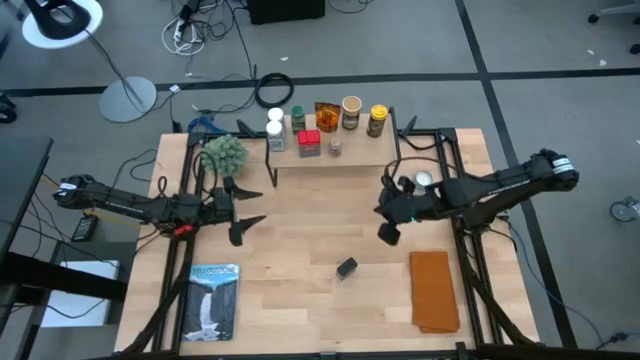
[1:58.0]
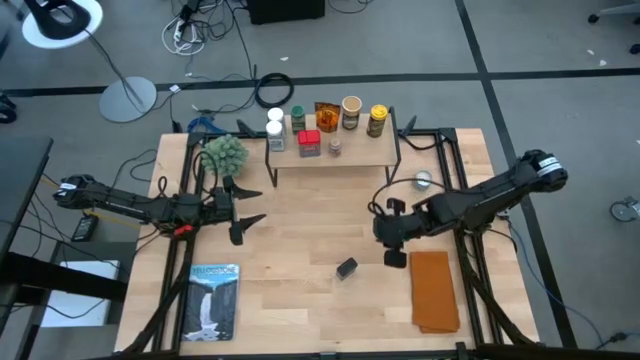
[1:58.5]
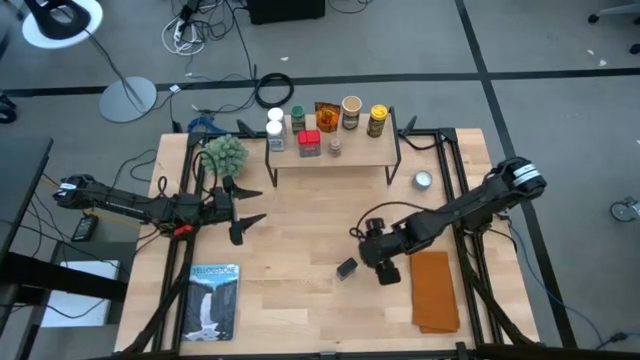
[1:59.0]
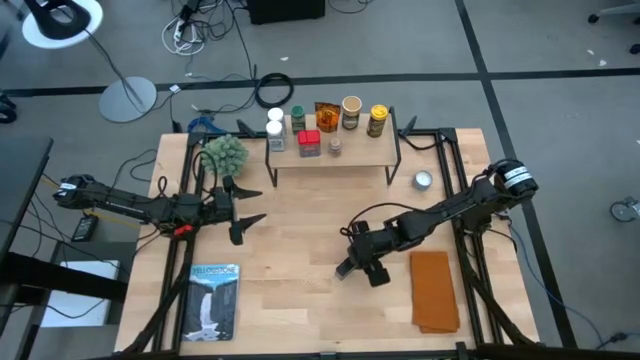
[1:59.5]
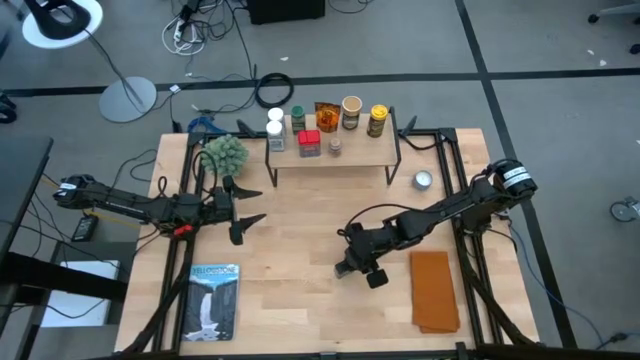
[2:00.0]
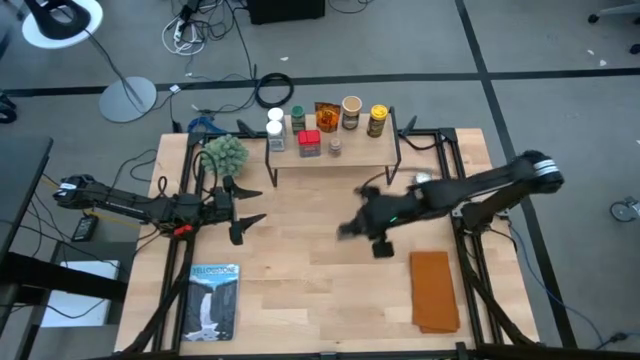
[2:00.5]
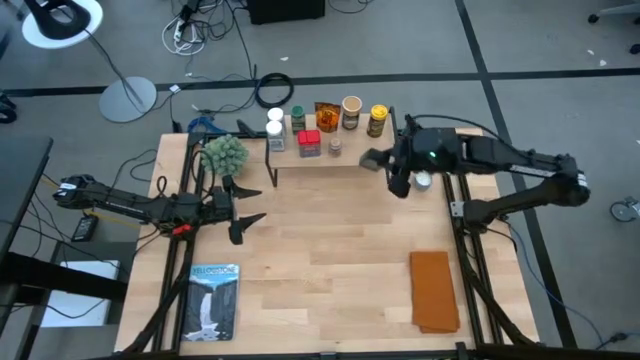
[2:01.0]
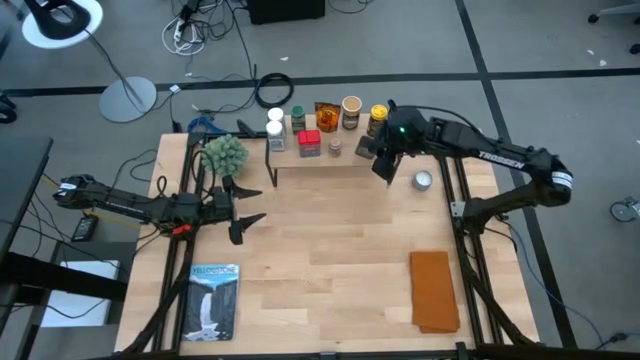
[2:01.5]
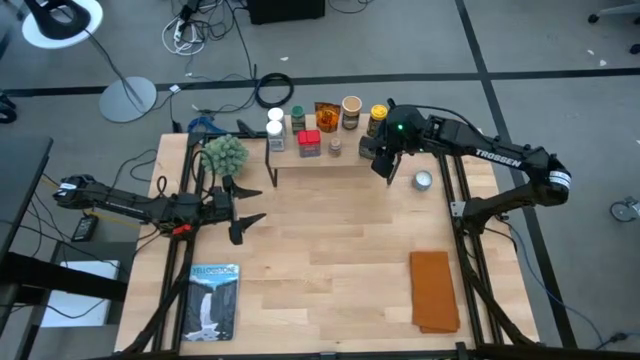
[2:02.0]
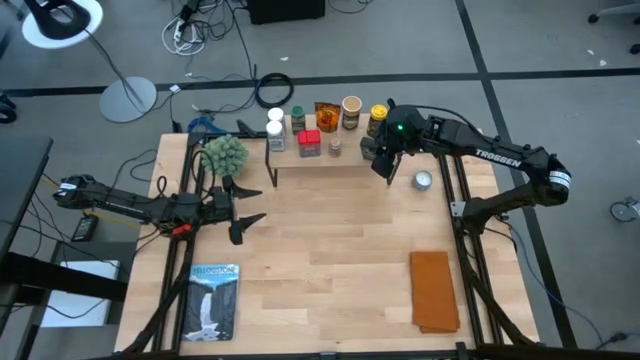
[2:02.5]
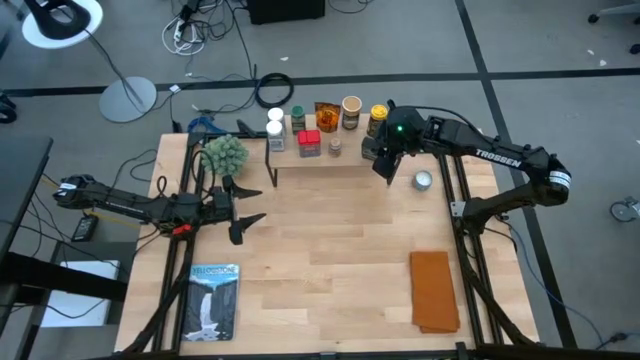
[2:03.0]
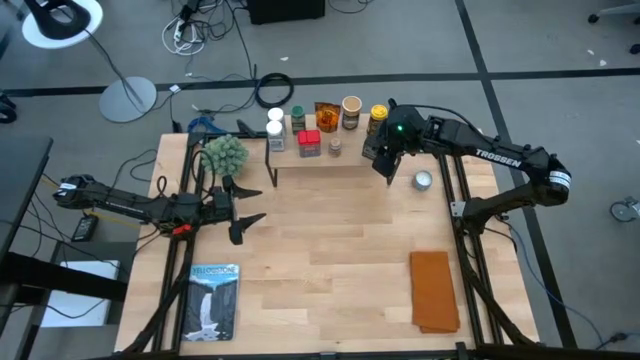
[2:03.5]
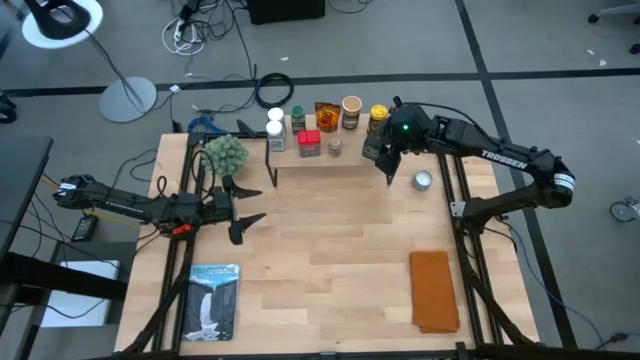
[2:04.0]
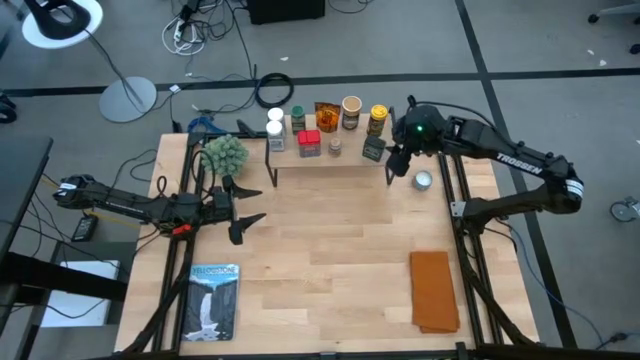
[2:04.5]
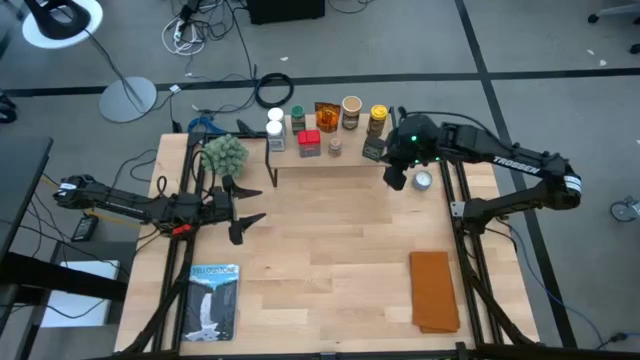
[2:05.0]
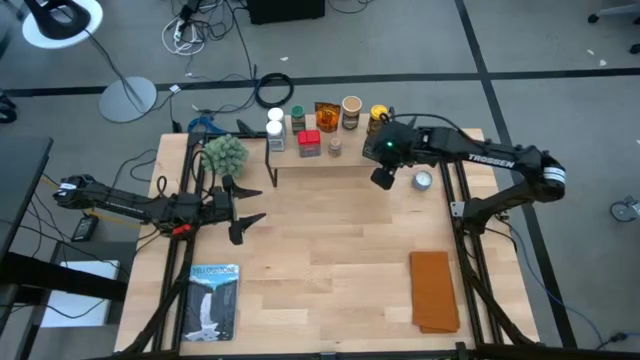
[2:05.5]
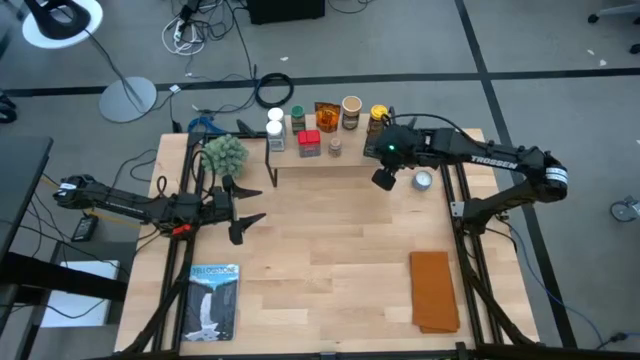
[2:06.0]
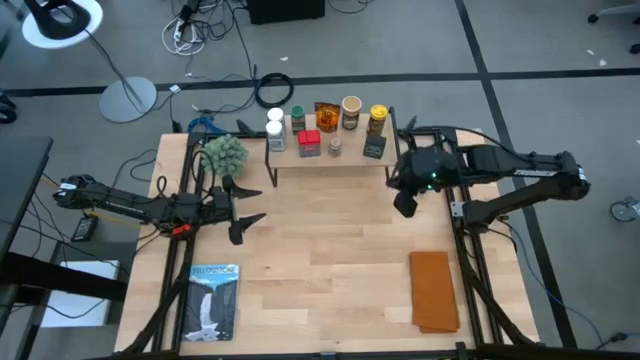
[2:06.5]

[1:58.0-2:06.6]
Task: Shelf spices
Put the green seasoning can on the shelf

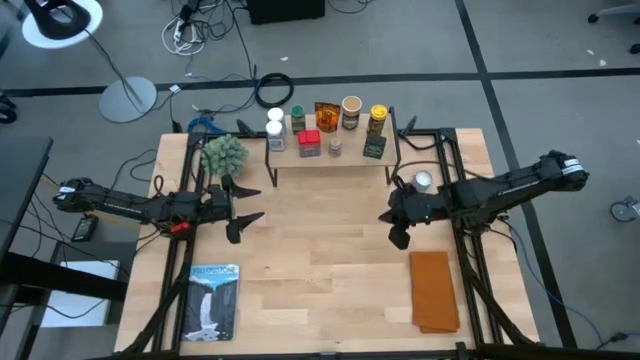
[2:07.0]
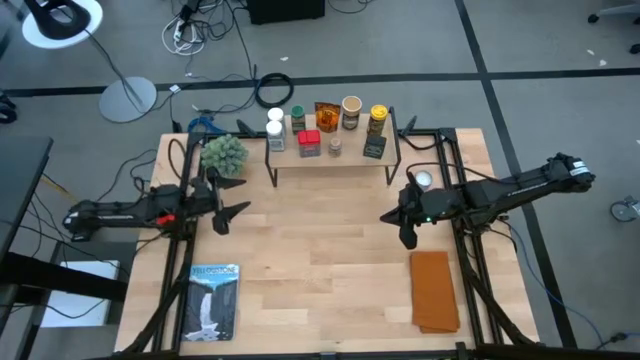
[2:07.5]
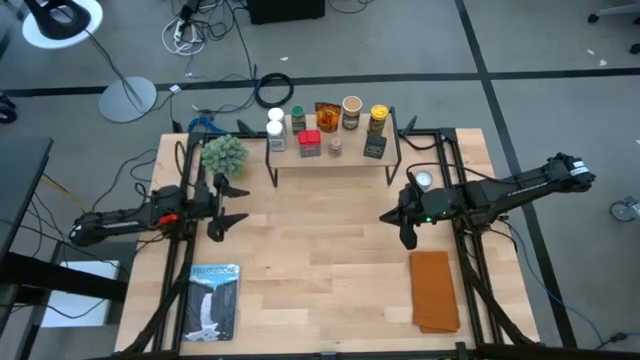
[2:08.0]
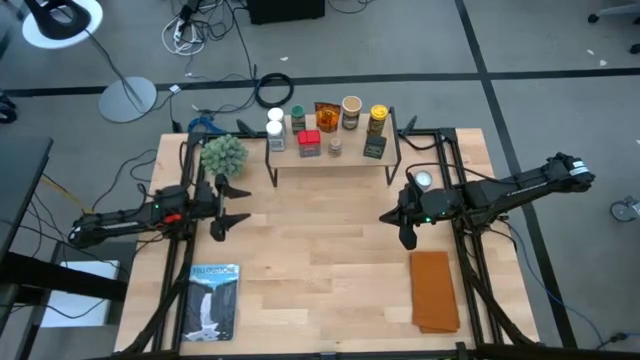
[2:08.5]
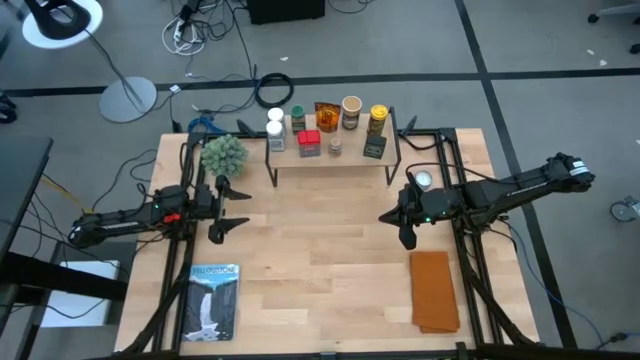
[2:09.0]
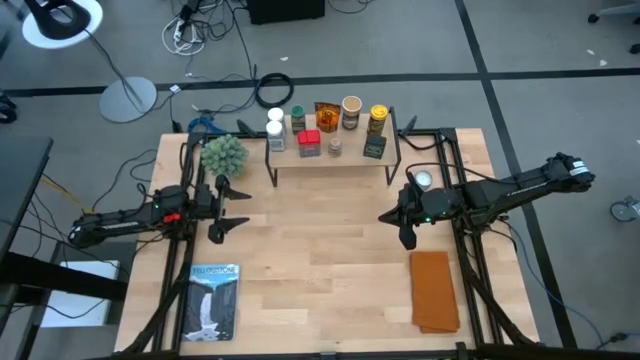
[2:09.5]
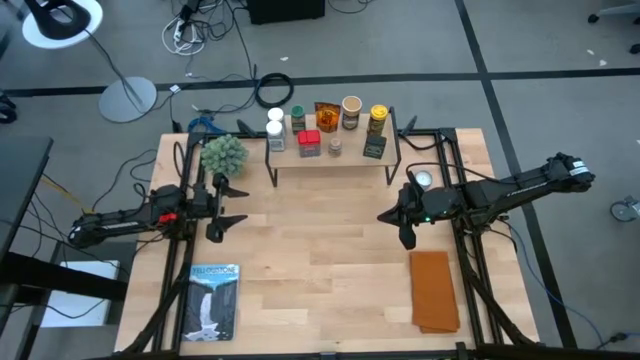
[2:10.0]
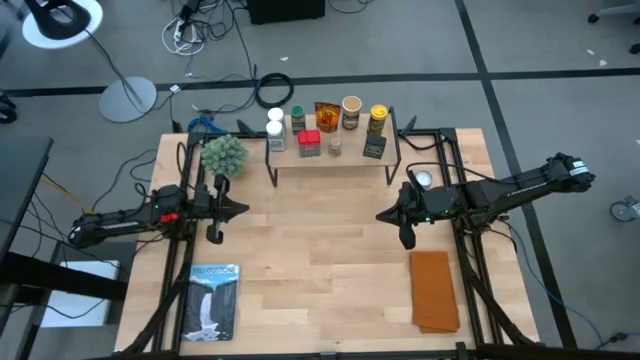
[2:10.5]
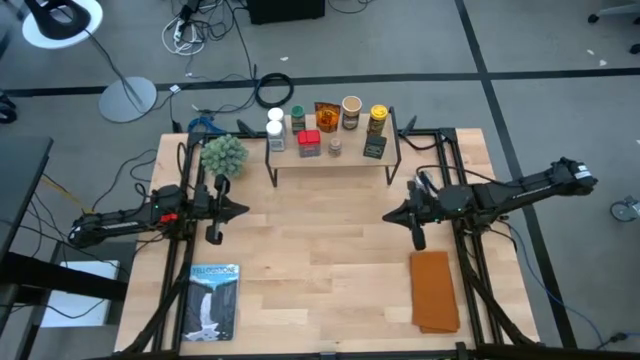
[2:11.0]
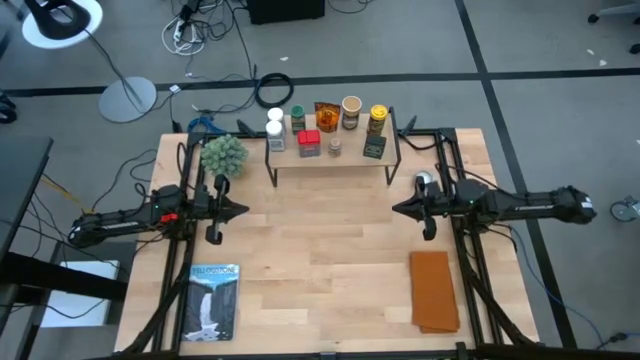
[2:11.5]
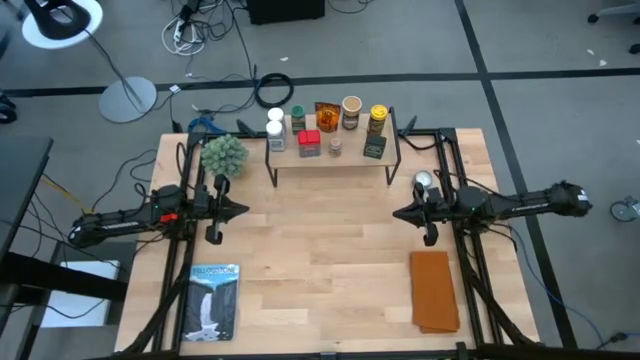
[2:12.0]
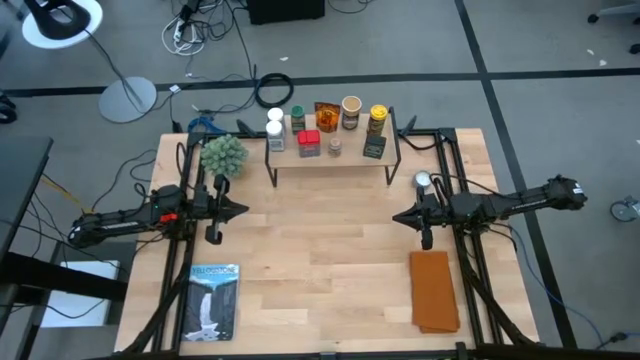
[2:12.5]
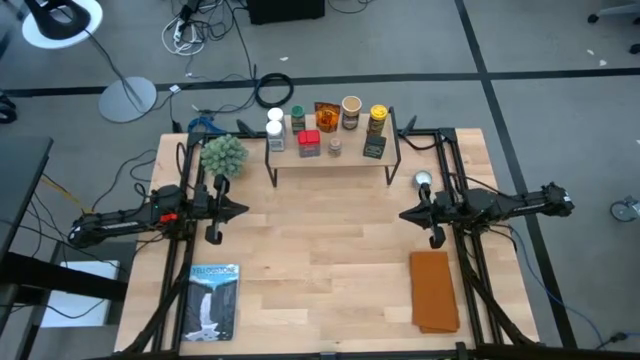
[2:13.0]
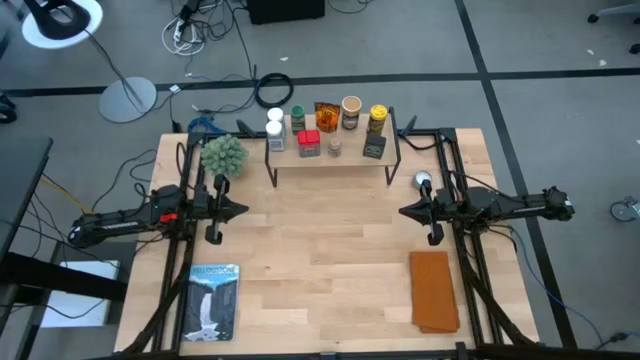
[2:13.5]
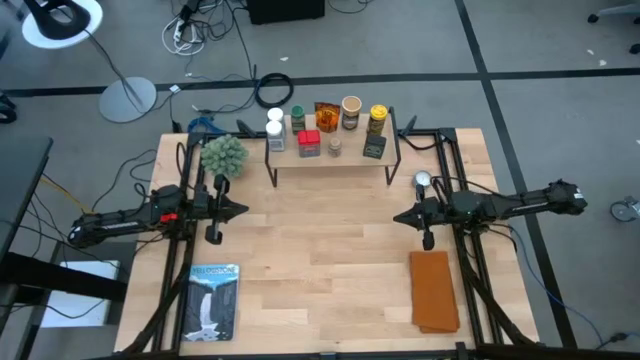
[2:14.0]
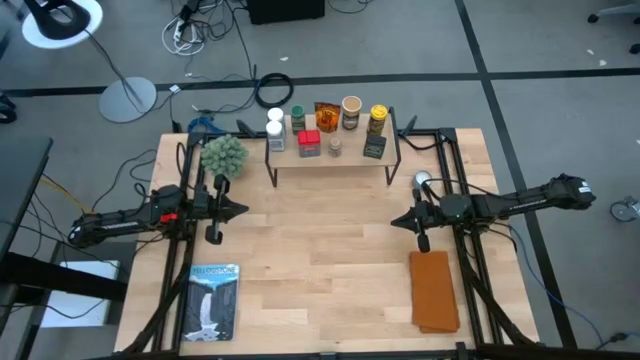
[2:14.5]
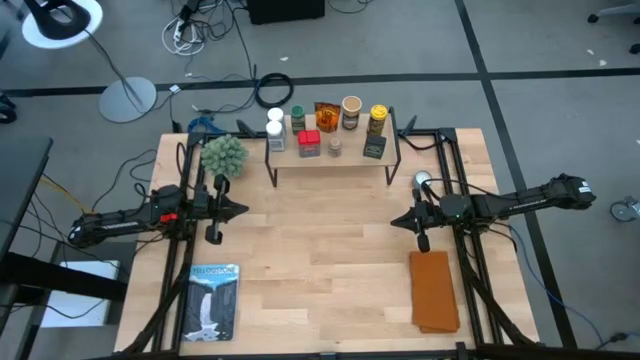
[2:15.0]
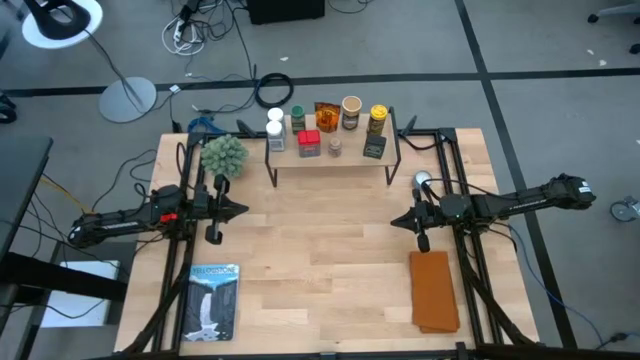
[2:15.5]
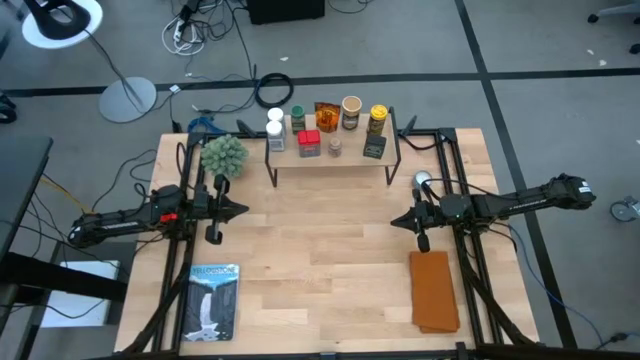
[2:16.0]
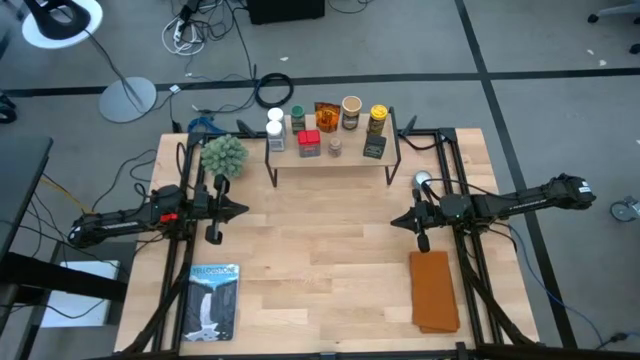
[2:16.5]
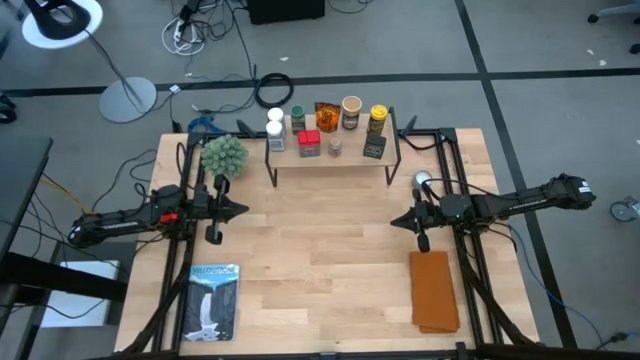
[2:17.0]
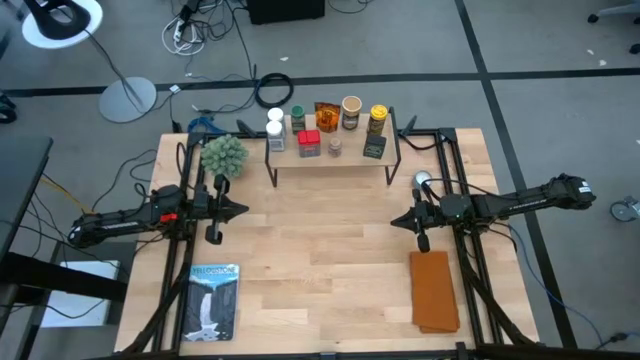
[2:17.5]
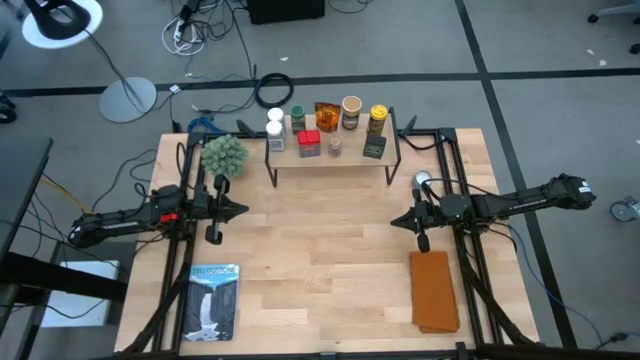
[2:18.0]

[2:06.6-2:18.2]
Return to Home Position
